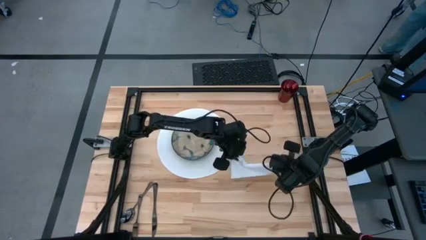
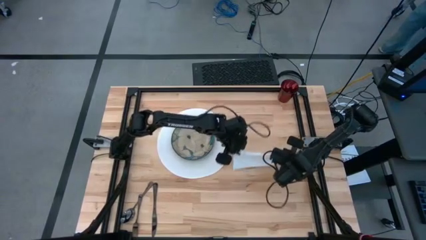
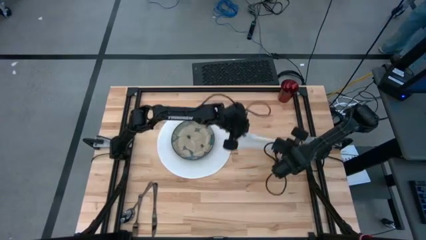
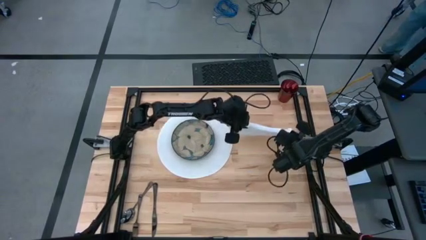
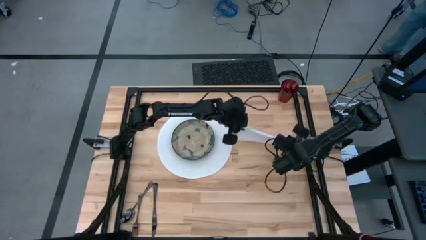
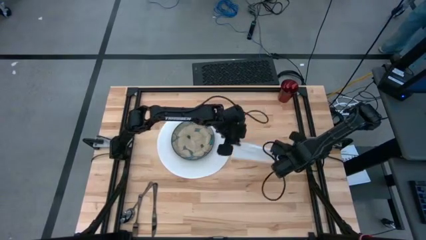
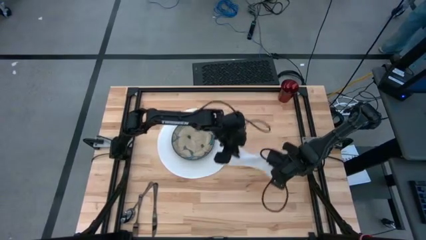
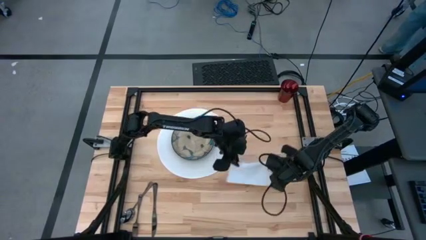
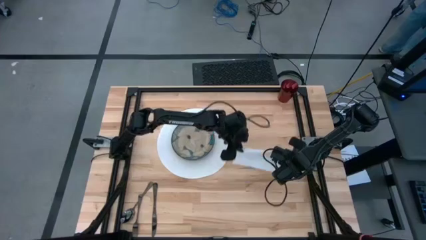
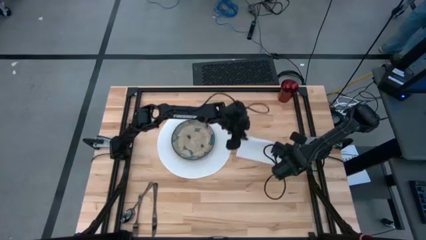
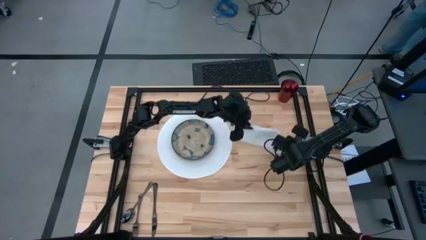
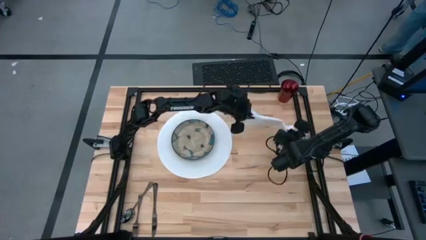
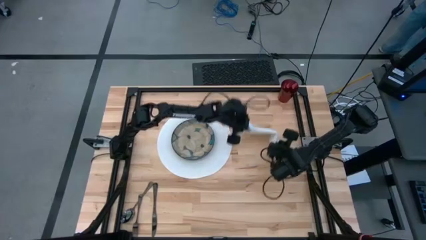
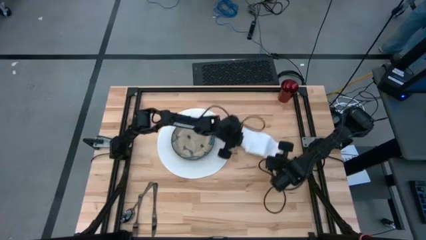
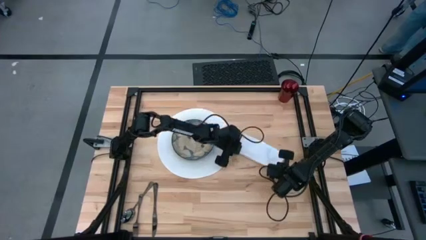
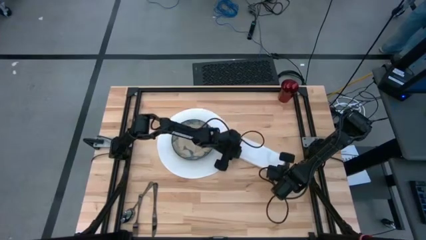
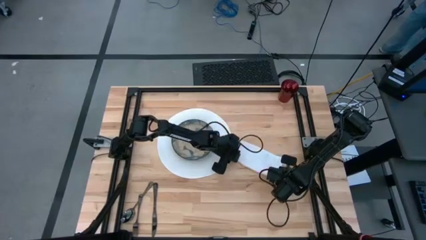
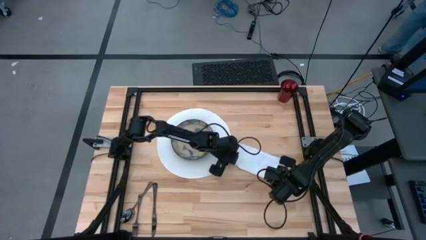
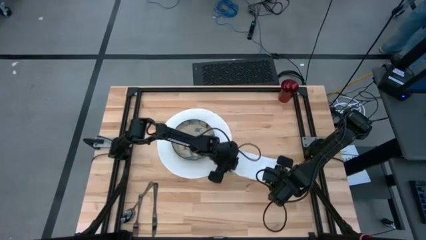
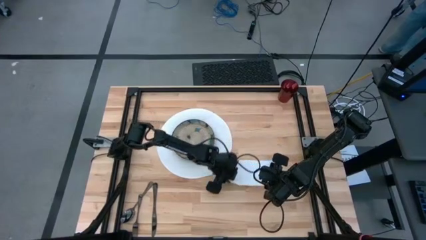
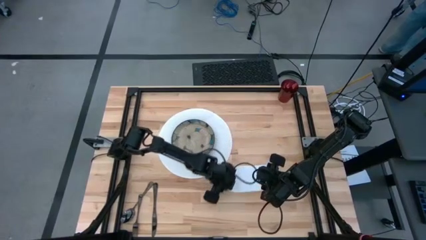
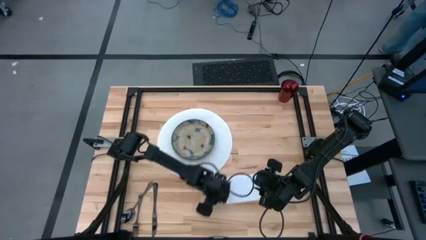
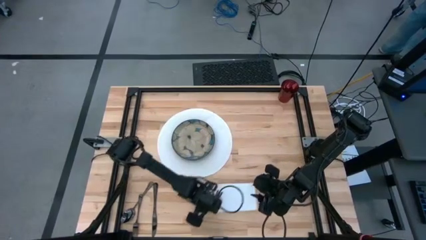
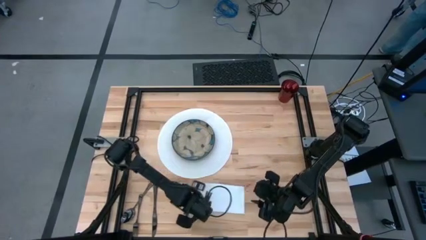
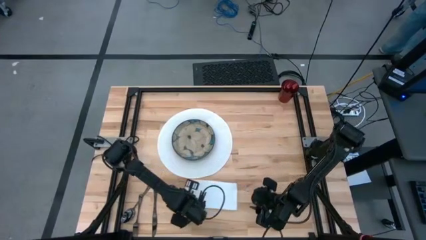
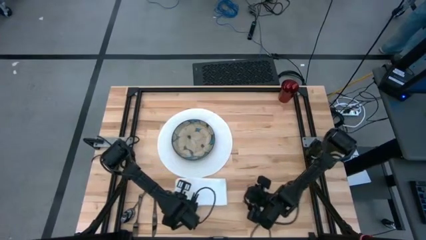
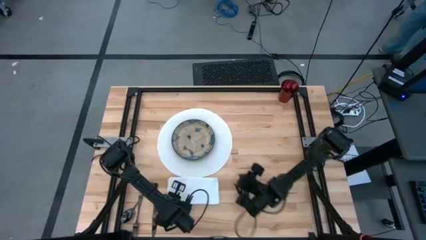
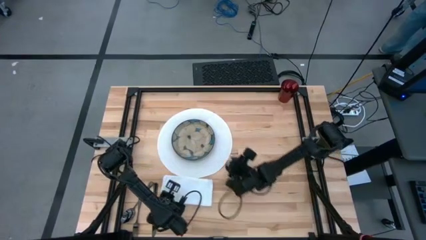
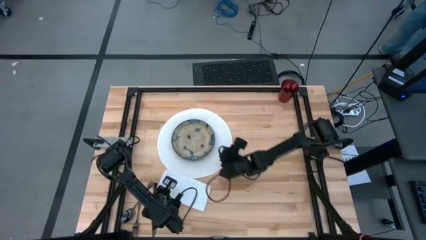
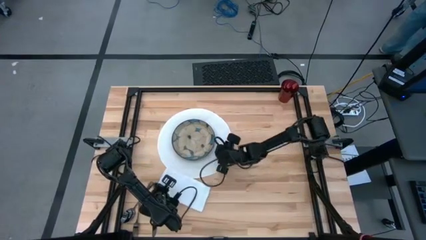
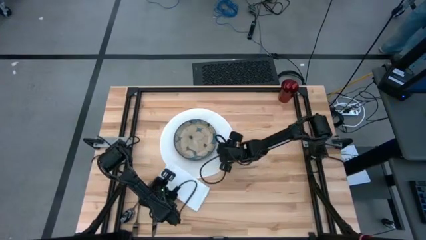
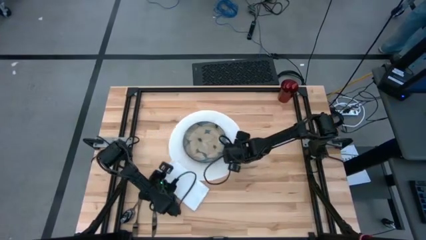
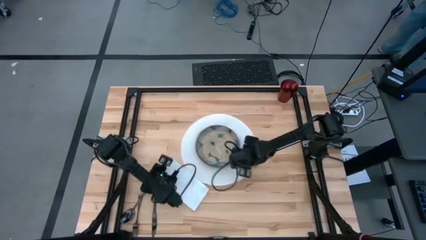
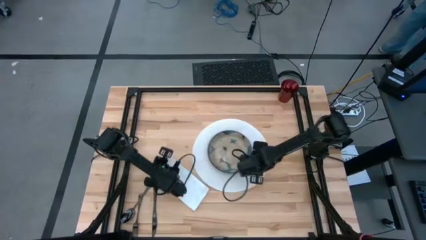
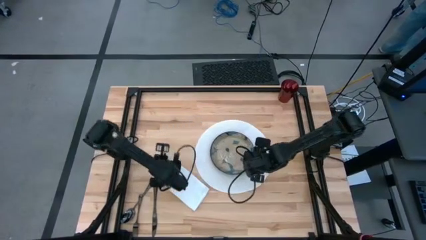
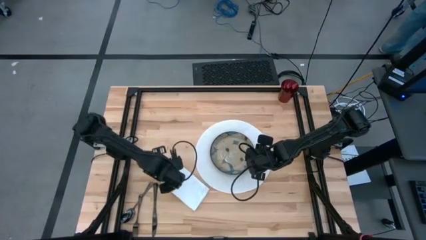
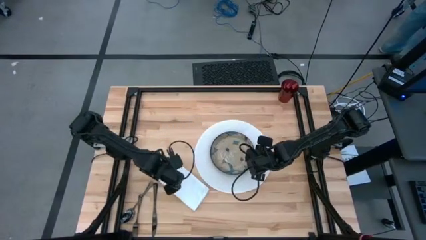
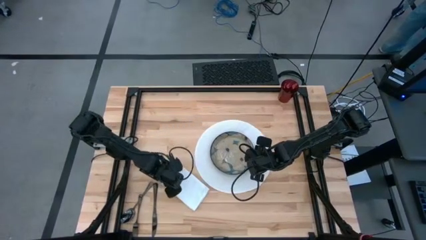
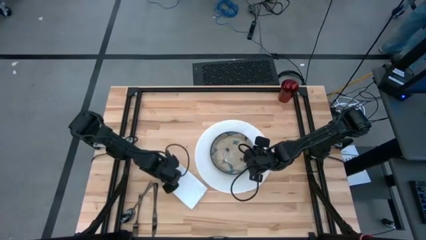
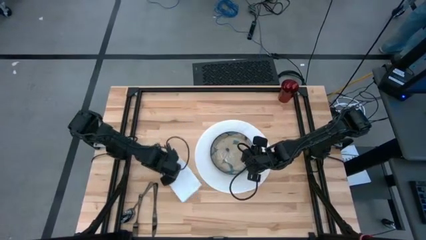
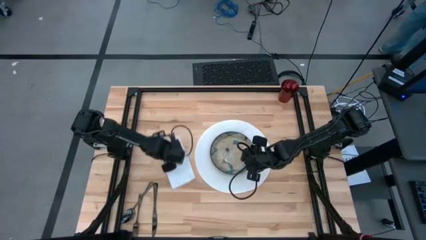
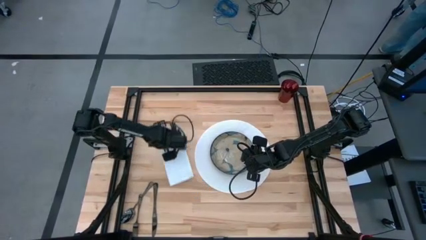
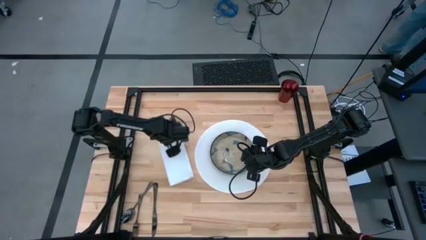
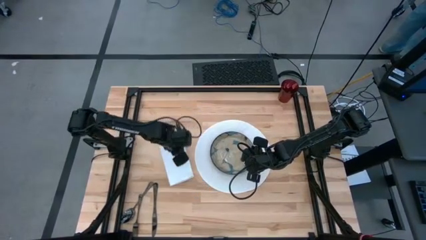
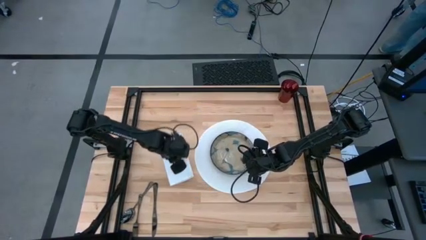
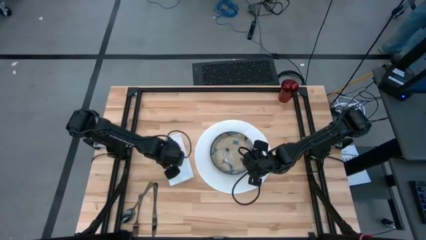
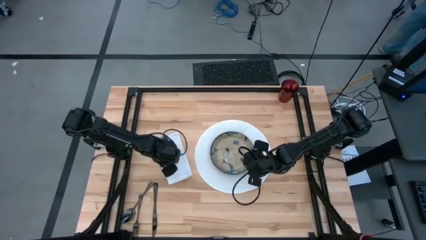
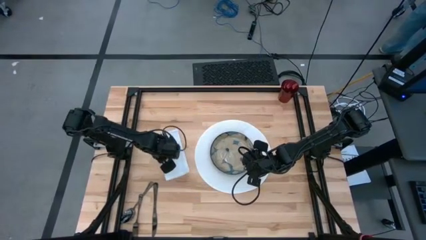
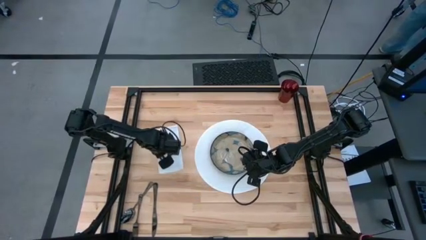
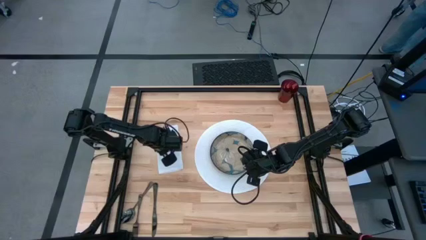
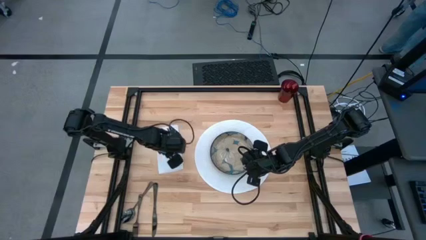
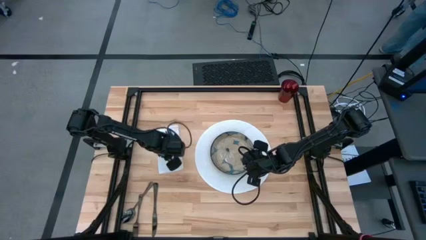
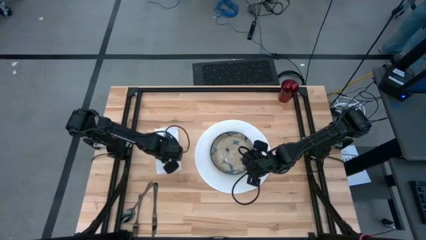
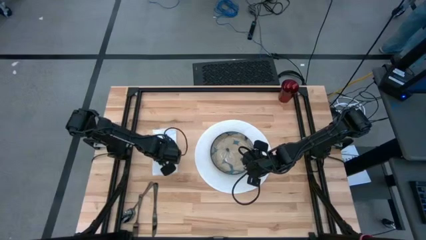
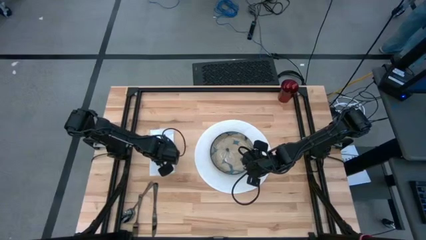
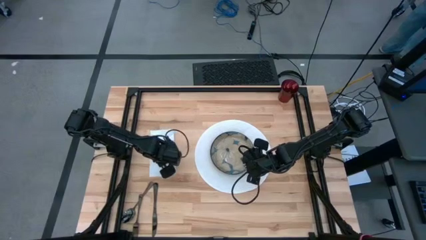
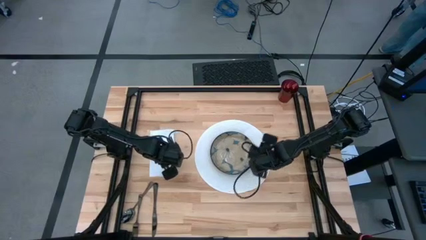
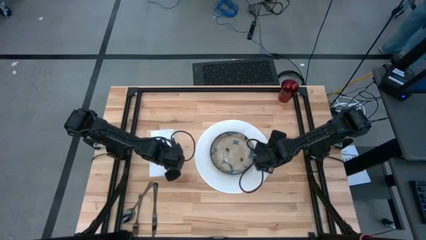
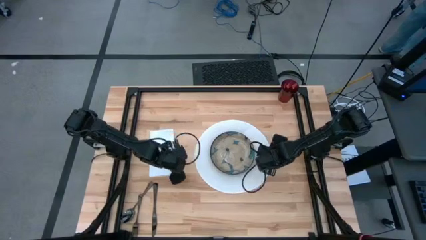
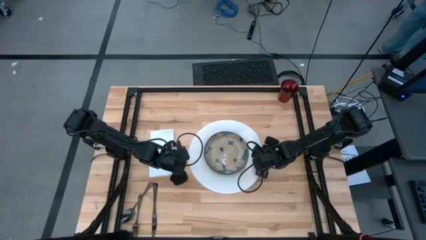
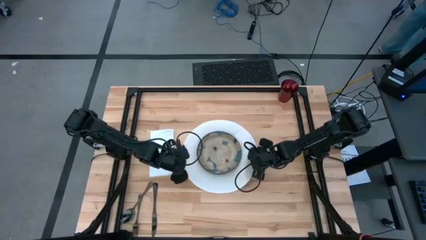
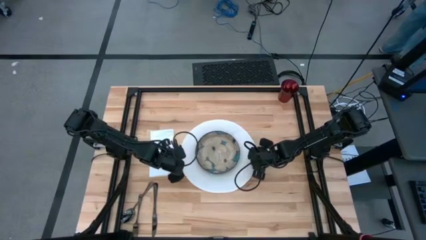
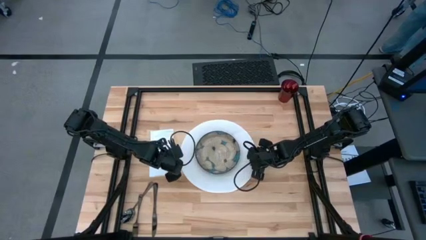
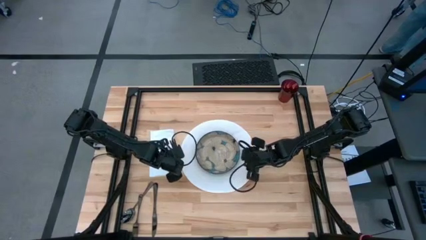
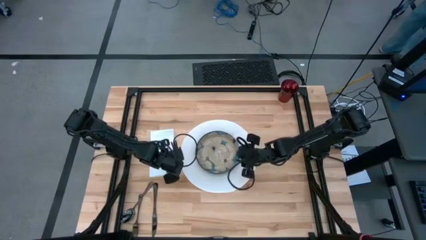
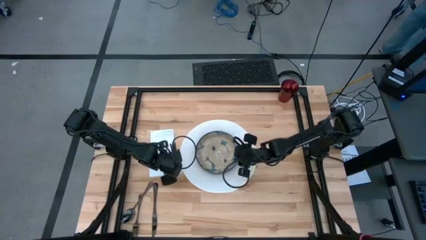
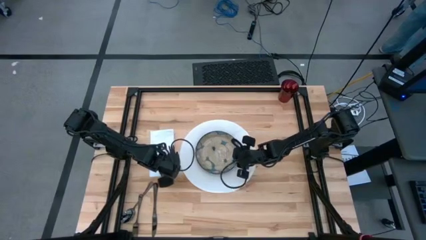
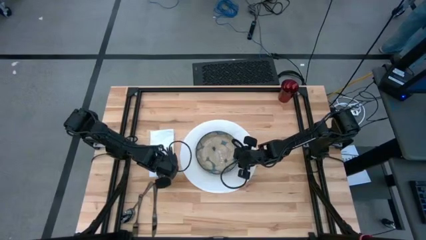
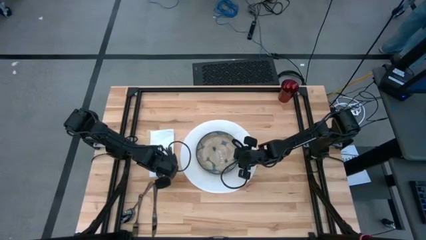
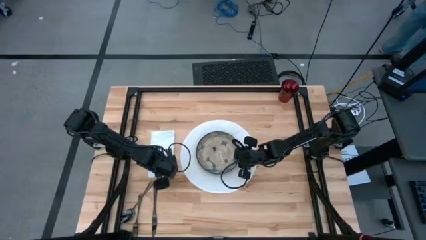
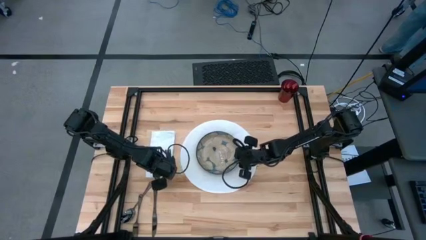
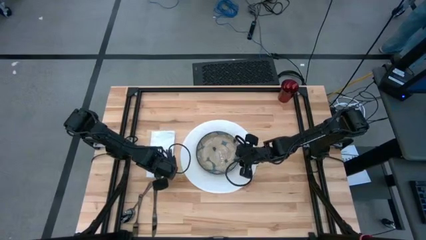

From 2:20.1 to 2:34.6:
Task: Set table place
Fold the white napkin

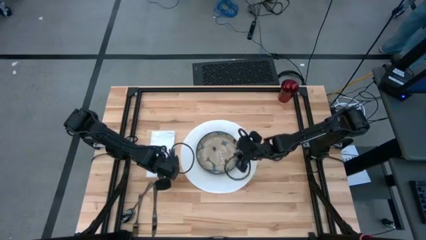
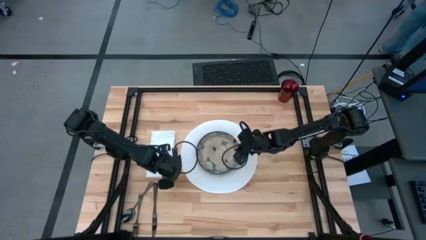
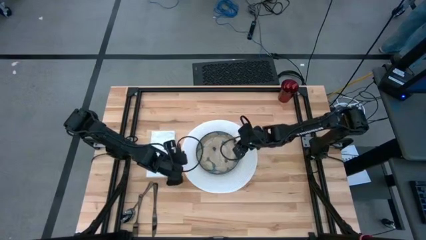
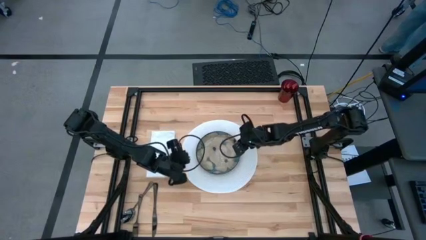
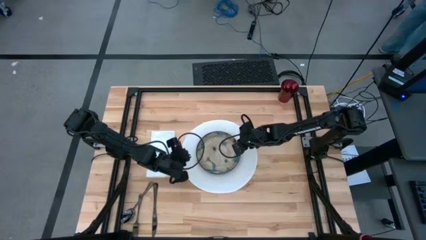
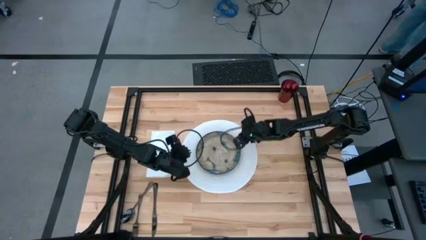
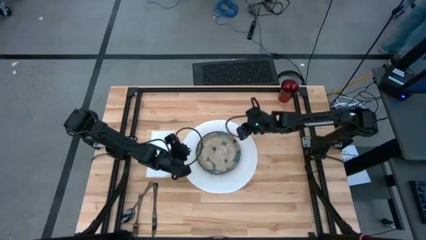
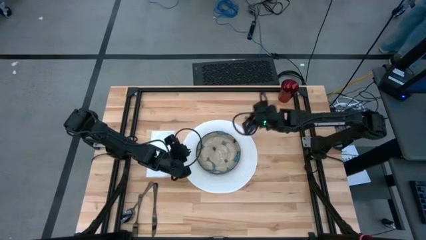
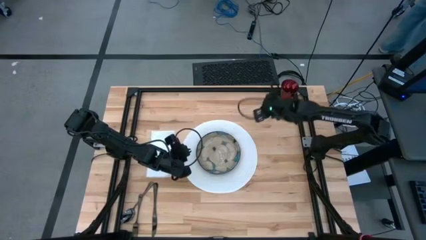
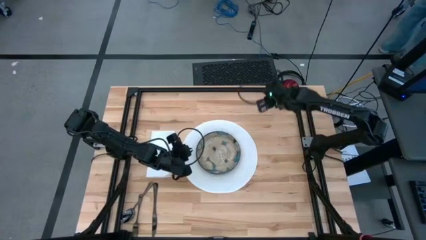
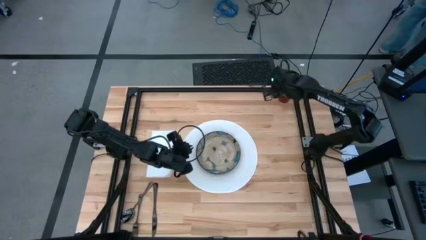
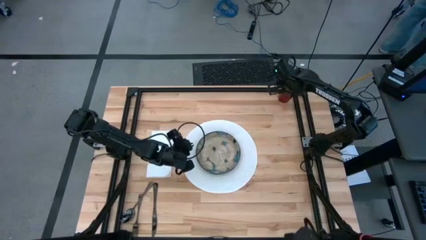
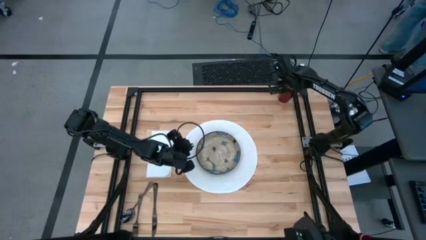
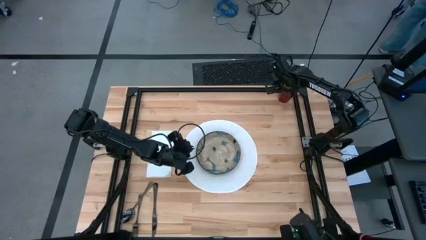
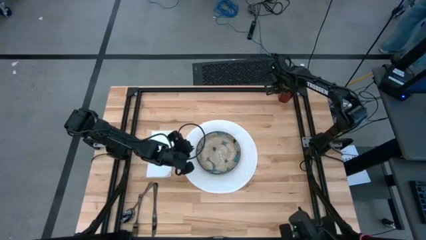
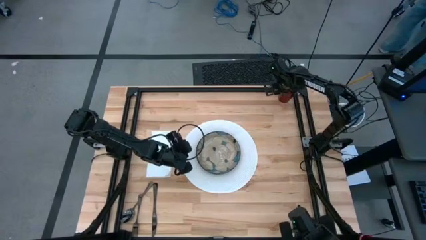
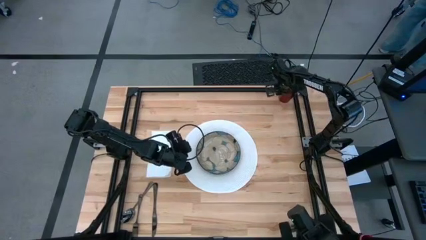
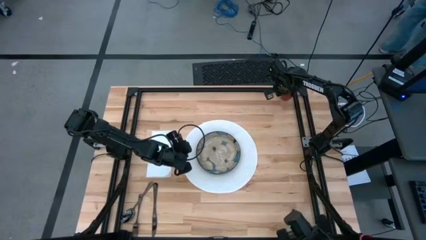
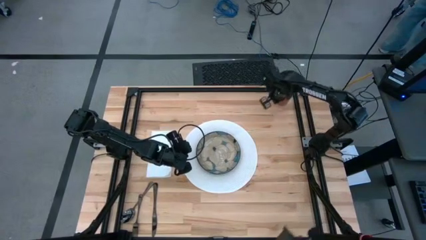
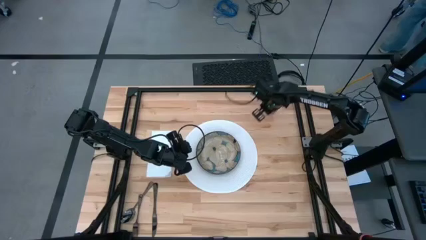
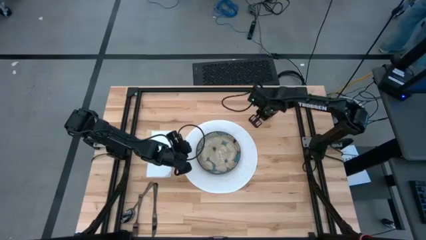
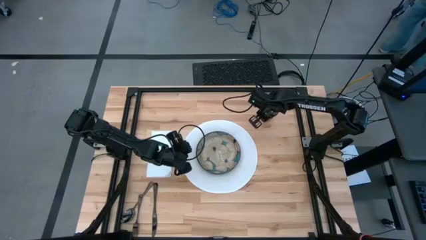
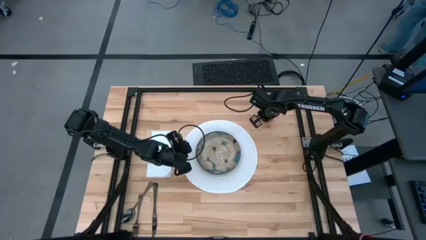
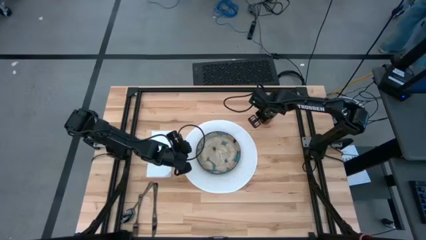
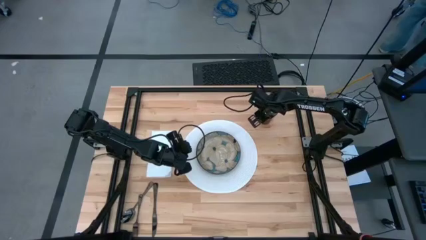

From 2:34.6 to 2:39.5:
Move the red glass onto the top right side of the white placemat
